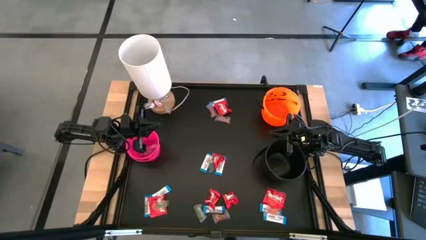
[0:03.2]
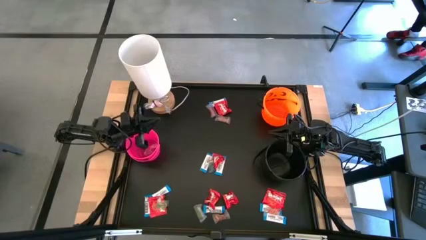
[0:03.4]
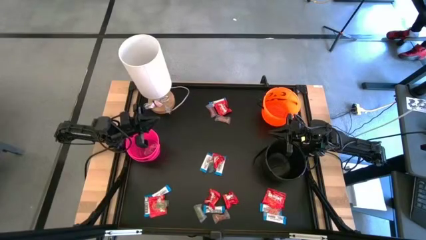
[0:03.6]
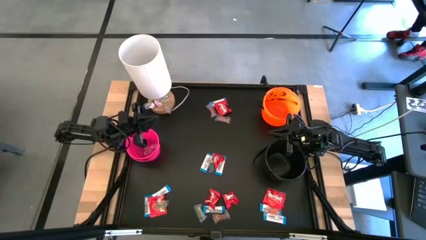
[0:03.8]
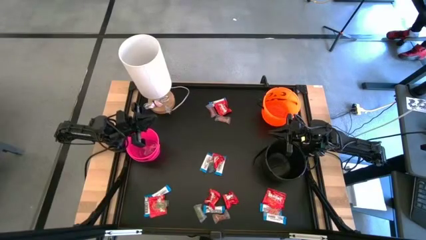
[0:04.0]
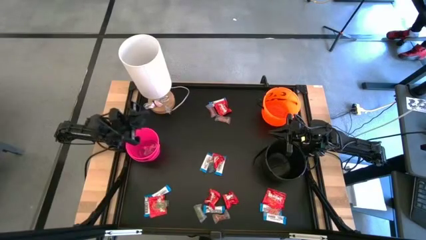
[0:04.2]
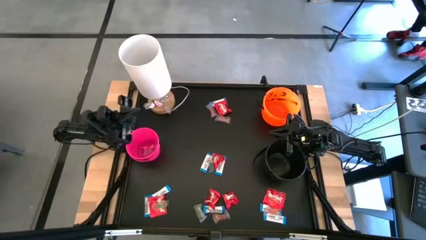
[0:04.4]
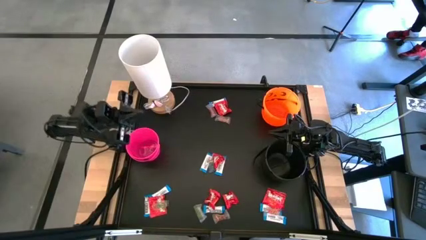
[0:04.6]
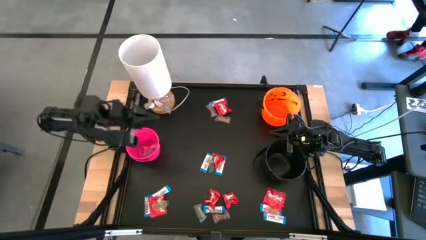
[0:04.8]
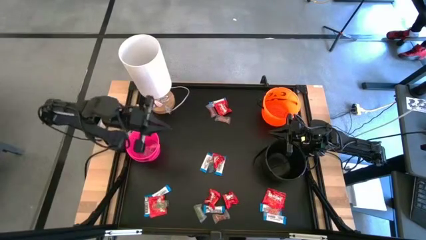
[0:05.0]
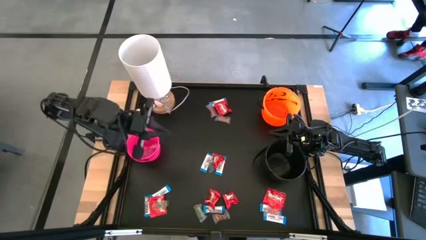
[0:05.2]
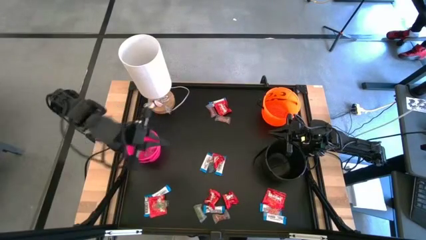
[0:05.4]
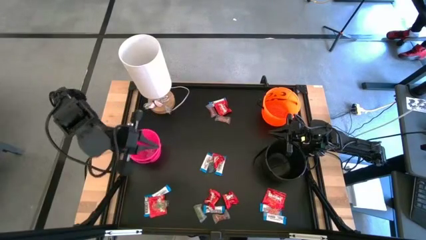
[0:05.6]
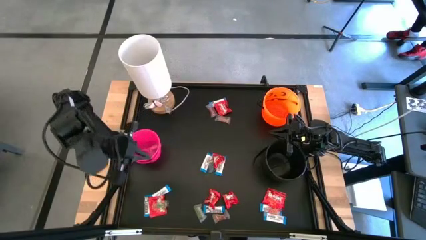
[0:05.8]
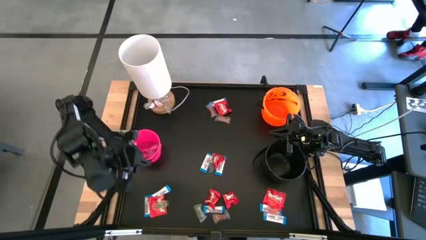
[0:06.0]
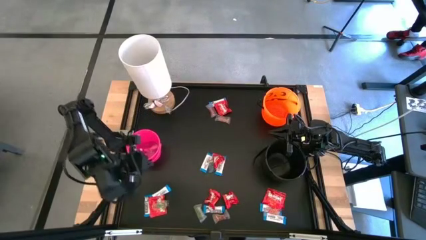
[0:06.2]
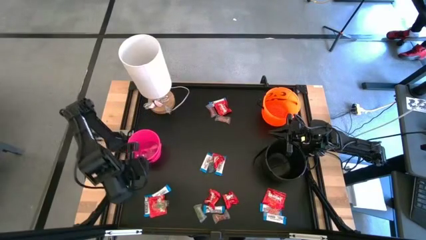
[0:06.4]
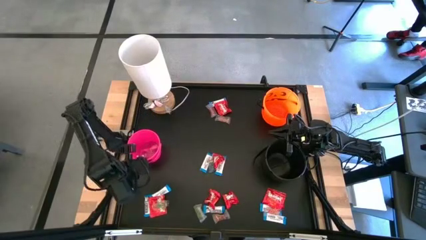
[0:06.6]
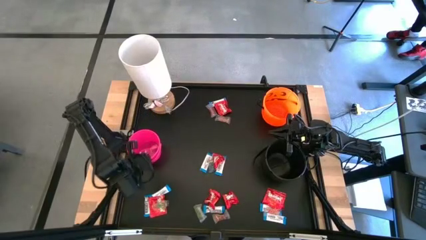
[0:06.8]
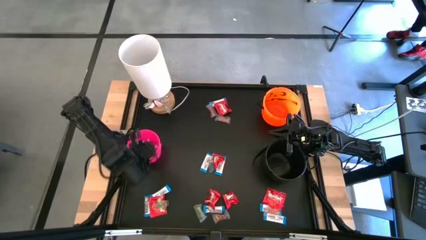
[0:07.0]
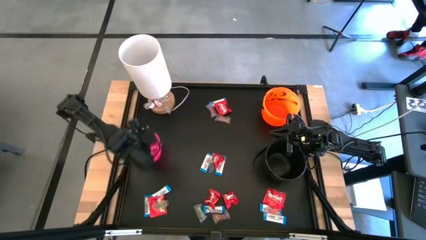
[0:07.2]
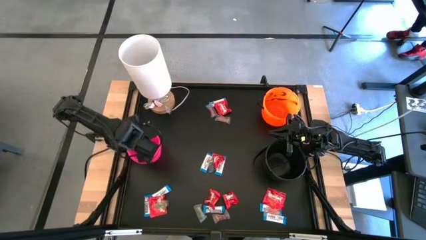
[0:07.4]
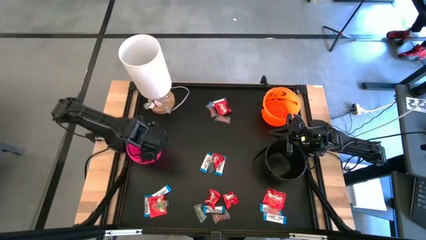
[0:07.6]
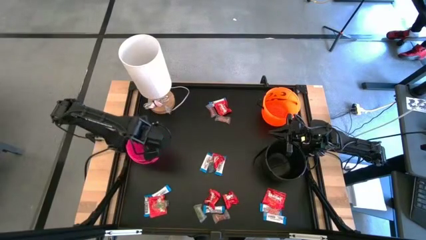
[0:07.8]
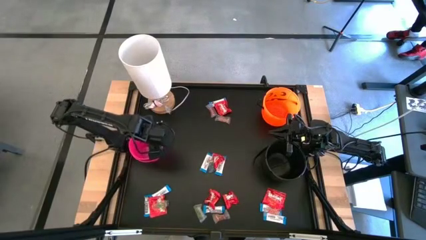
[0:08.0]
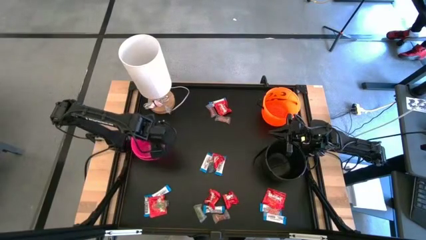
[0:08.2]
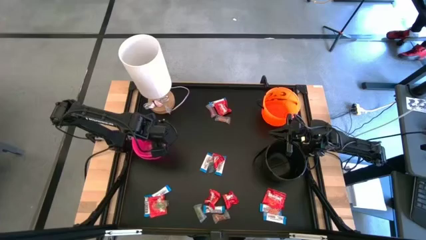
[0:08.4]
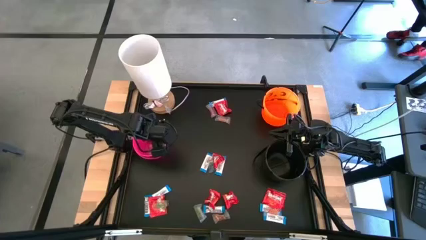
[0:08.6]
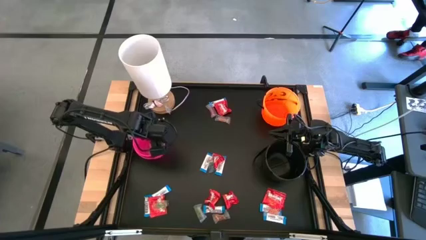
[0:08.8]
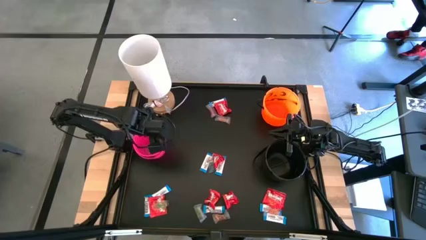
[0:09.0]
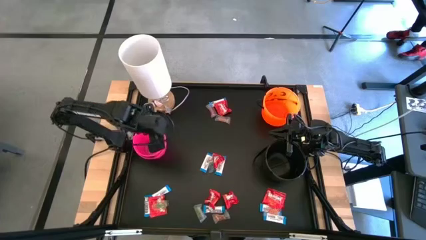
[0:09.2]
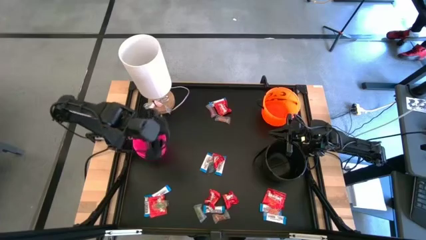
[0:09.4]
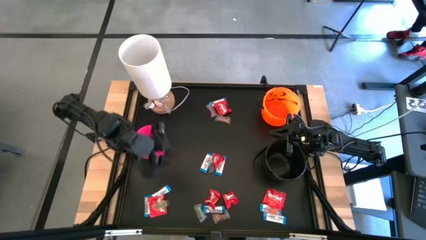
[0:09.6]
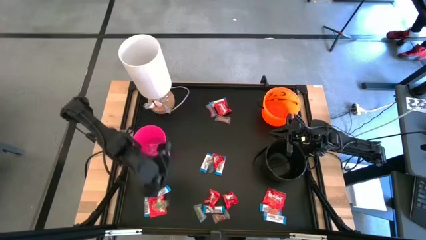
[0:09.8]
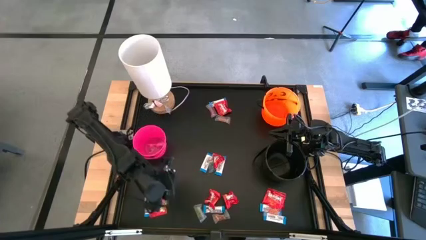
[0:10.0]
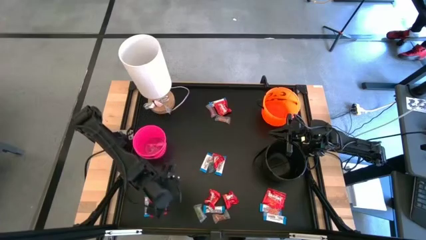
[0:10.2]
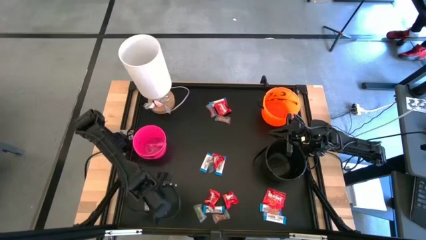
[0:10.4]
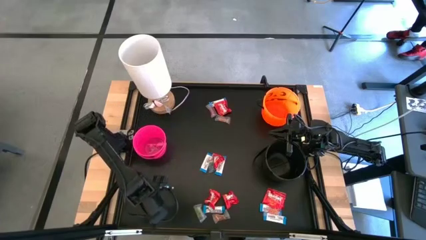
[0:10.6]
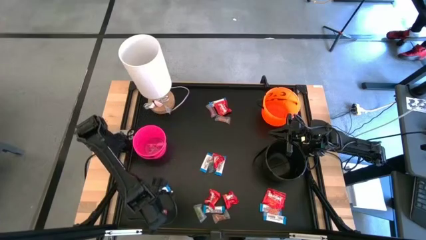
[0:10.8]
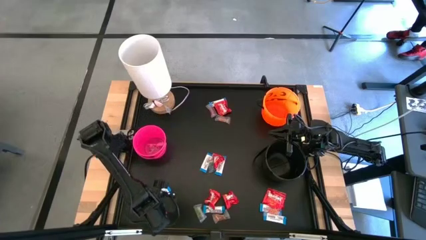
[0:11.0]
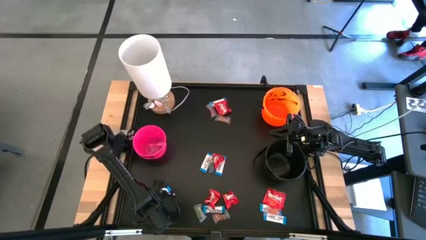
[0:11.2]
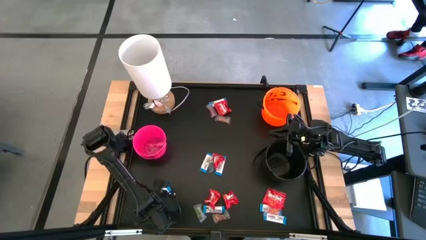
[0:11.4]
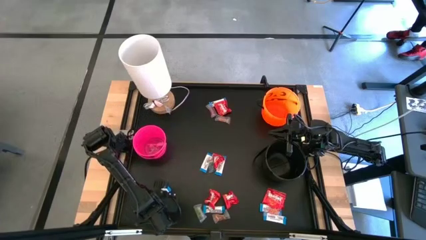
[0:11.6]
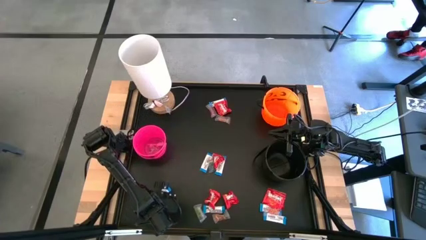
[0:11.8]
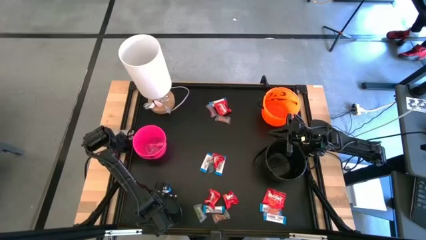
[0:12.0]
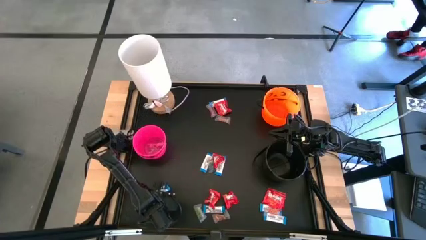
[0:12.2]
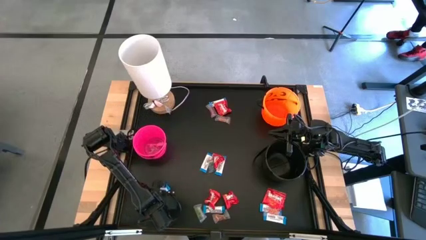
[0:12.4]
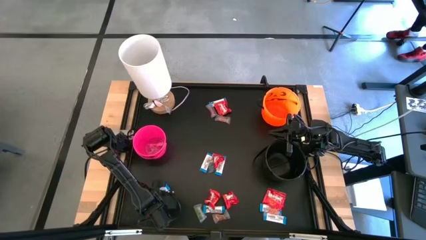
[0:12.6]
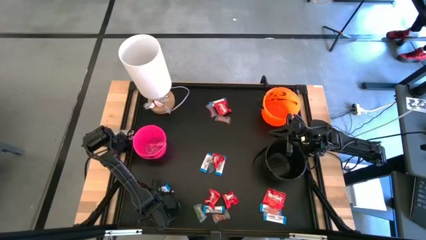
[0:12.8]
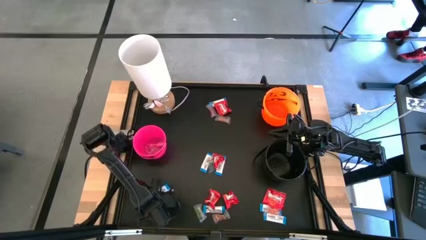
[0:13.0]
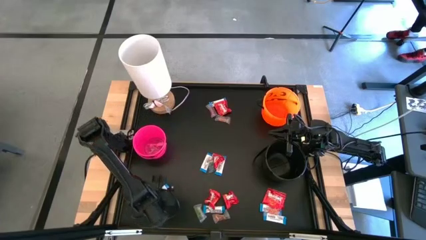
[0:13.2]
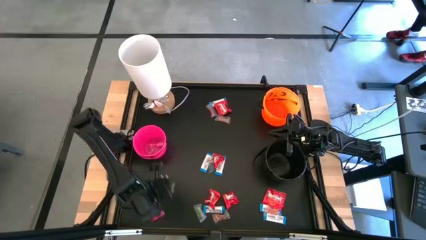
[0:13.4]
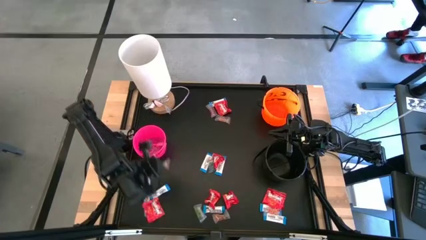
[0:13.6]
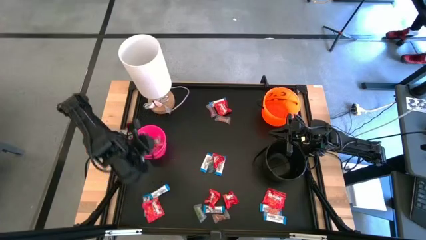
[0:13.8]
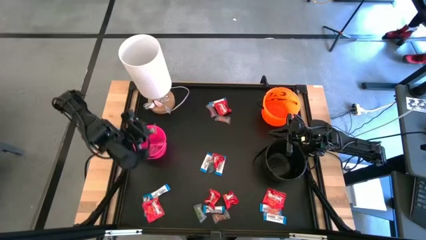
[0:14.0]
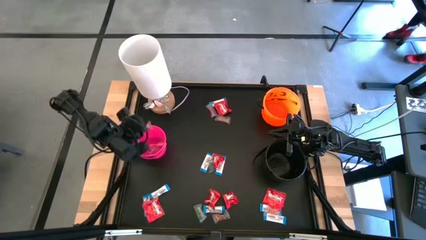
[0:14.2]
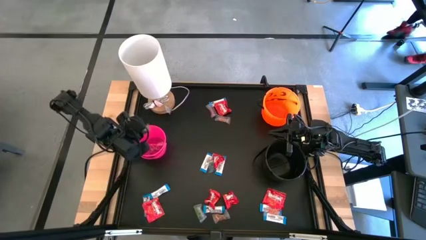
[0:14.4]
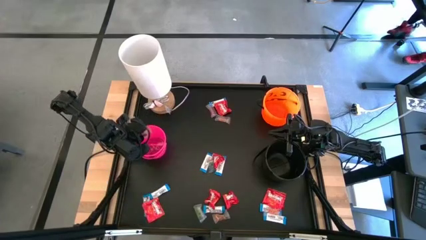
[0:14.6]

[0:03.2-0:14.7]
Task: Sort candy
Put the green gummy into the pink bucket

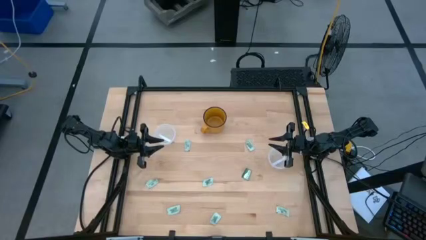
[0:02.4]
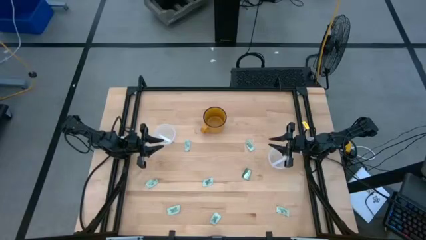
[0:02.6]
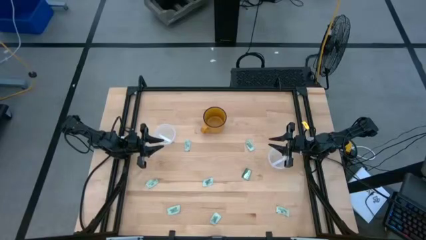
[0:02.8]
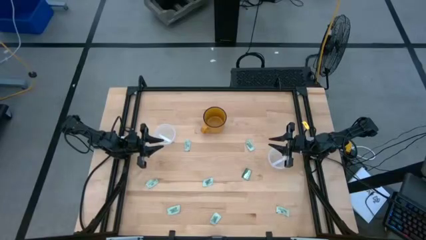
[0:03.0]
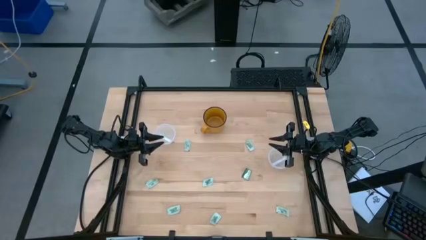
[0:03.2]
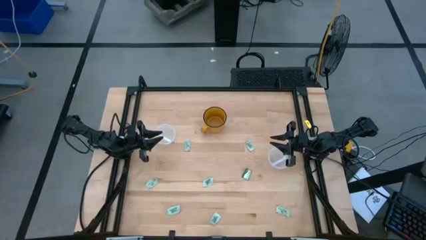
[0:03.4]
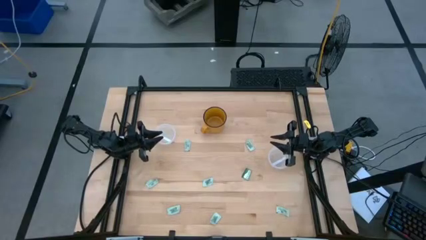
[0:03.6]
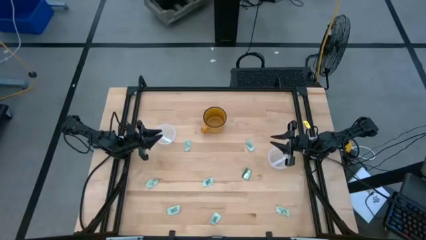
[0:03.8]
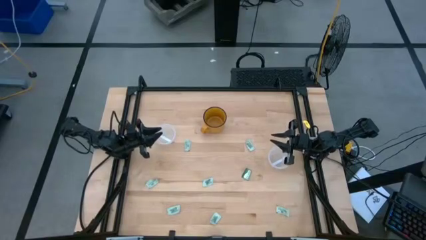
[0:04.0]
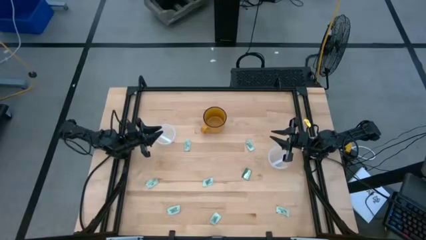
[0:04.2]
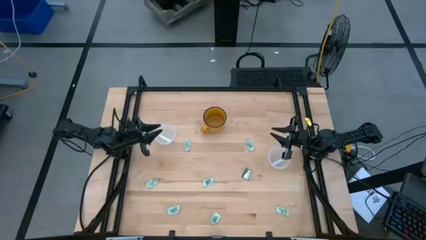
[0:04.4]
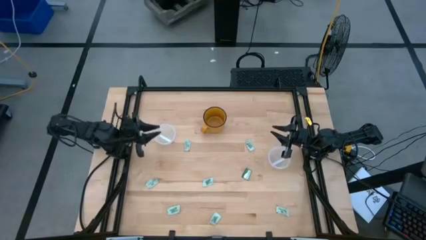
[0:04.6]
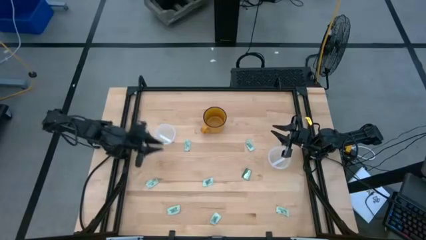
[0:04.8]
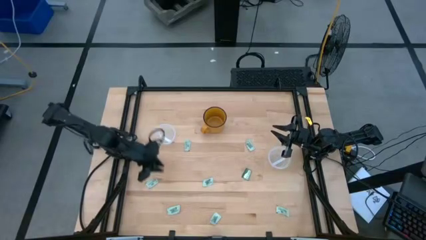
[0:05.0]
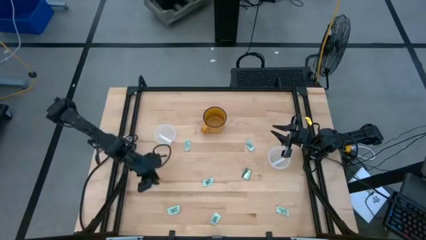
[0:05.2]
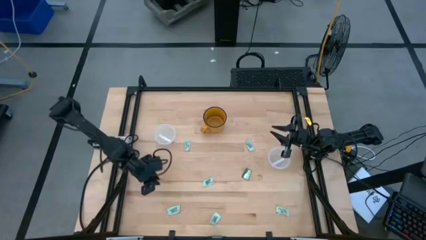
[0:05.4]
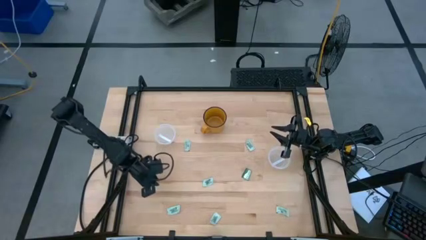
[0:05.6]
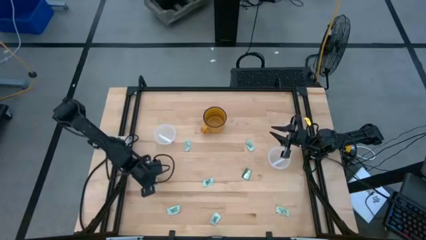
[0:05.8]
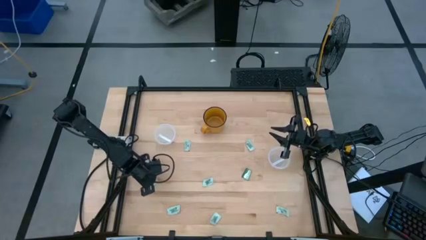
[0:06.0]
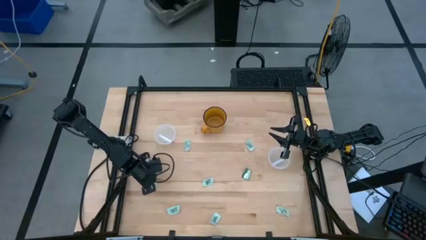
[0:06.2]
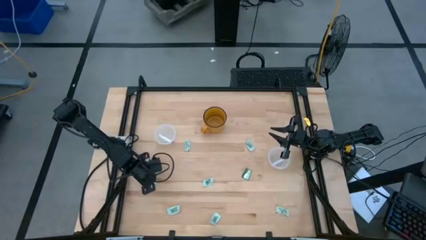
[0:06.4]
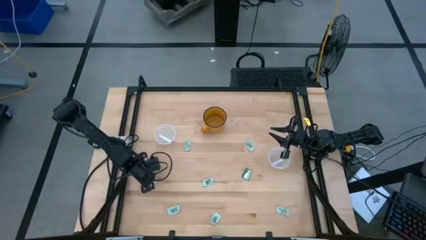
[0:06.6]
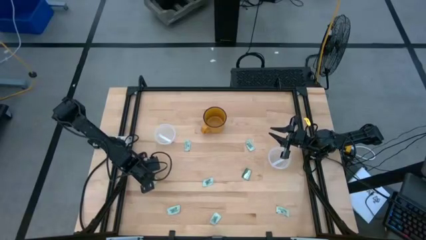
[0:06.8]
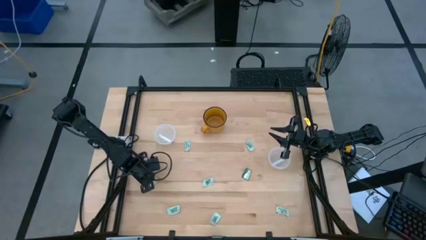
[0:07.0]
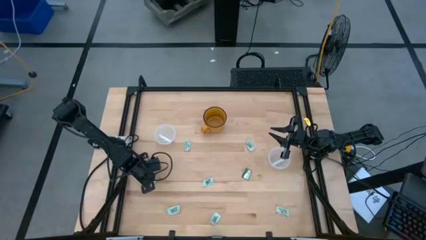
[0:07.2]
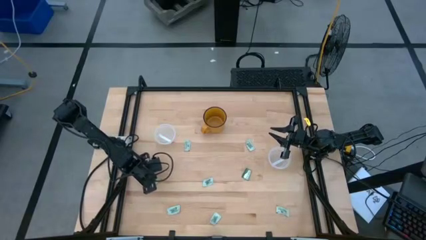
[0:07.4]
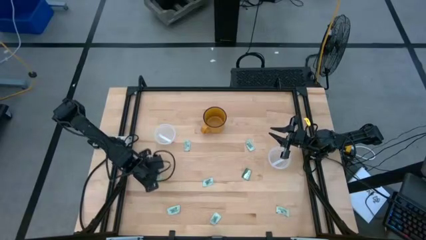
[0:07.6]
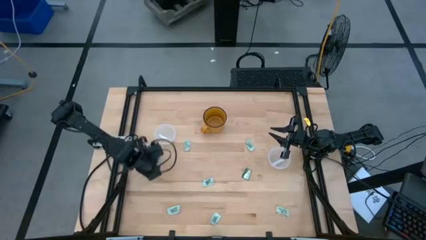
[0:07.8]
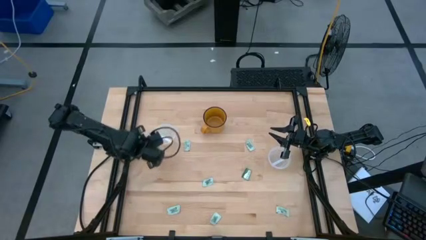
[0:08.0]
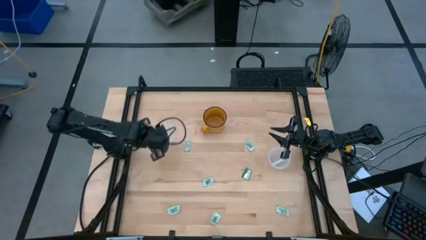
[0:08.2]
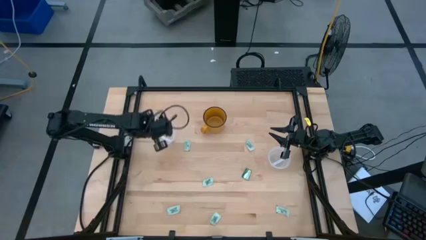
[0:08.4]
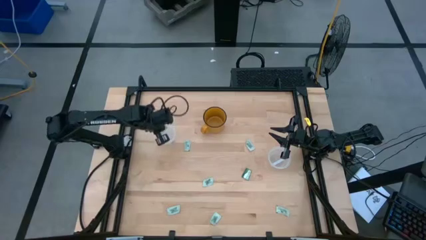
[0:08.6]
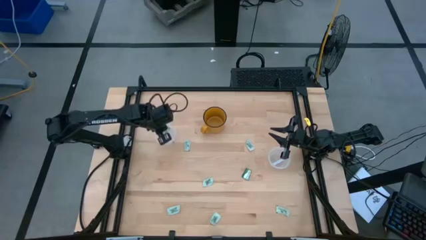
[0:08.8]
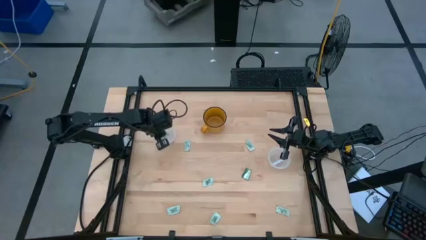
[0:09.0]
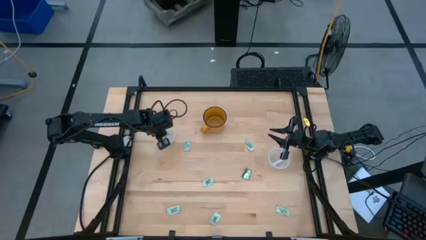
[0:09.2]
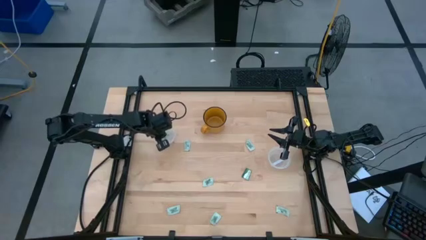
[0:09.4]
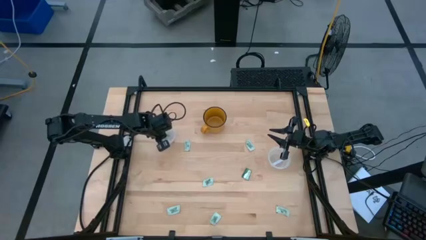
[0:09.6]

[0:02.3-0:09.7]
Task: Pick and place Stevia / Truvia into bins
Put the light green stevia packet into the left transparent container
